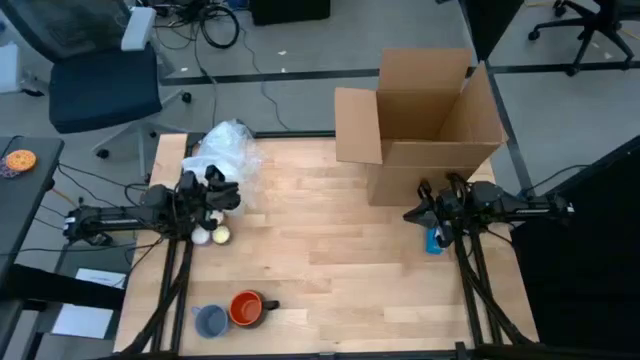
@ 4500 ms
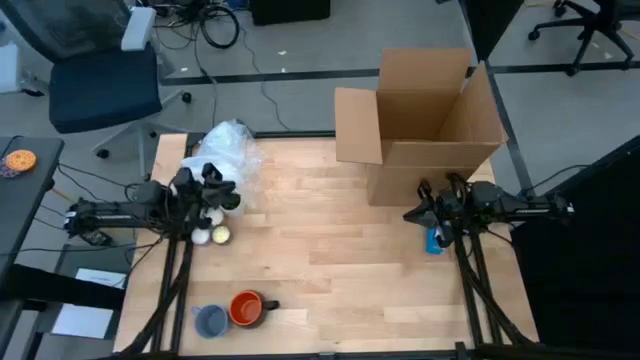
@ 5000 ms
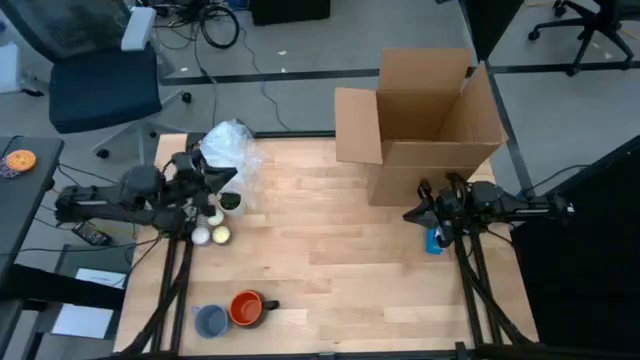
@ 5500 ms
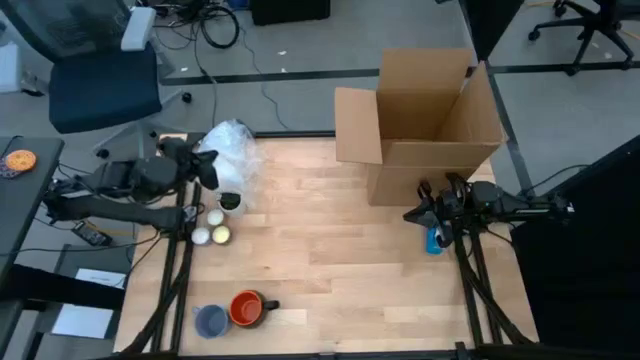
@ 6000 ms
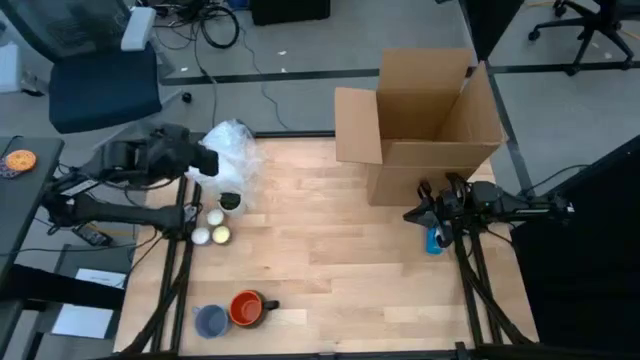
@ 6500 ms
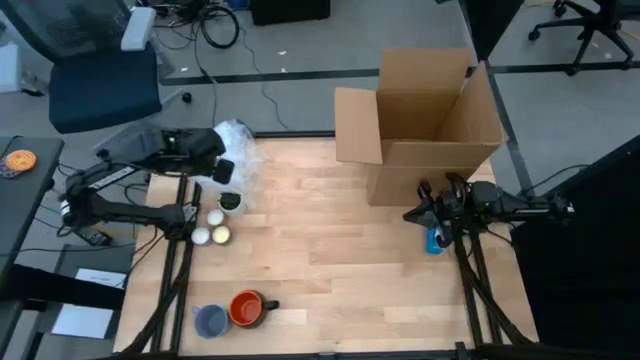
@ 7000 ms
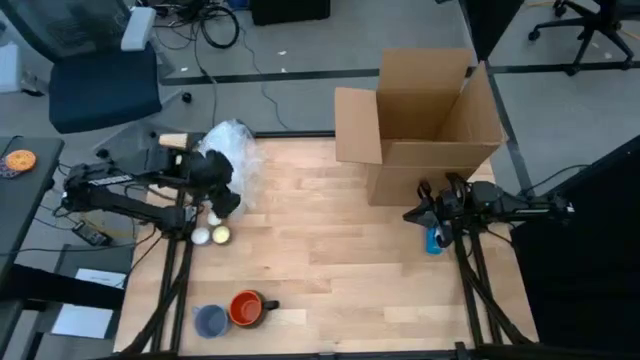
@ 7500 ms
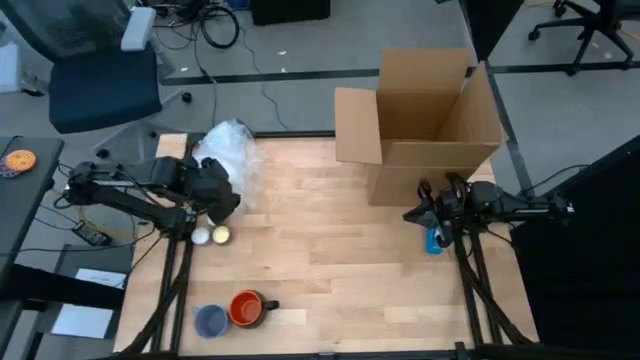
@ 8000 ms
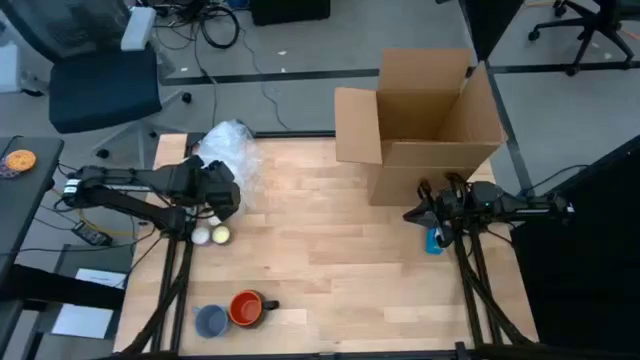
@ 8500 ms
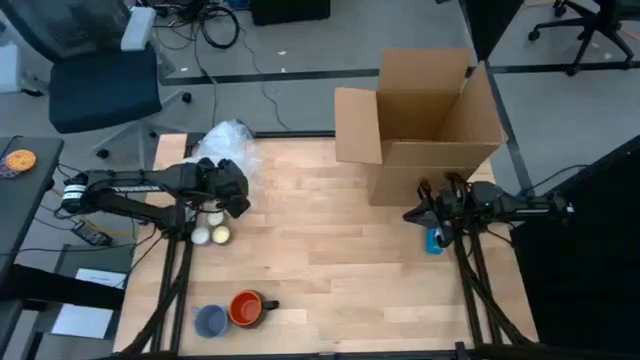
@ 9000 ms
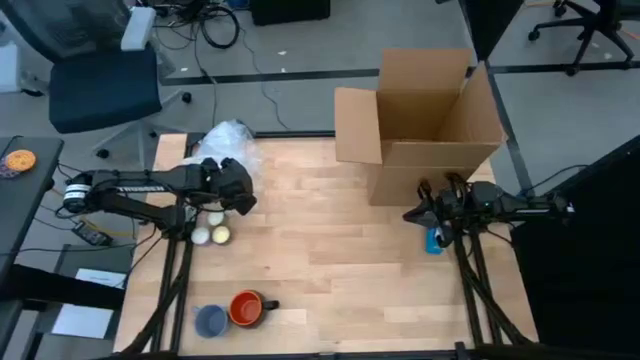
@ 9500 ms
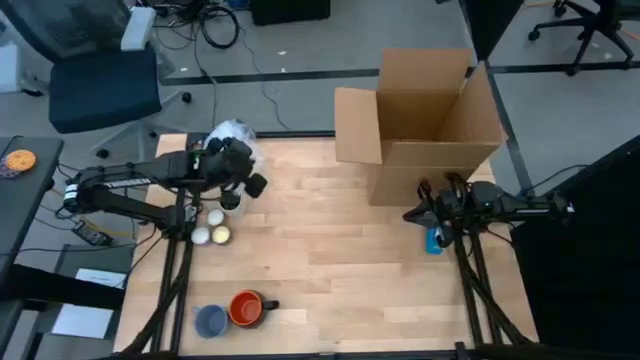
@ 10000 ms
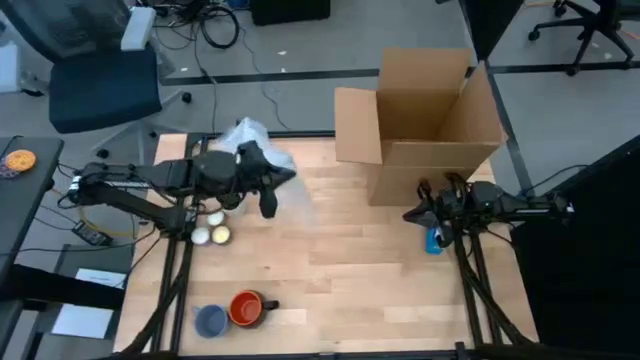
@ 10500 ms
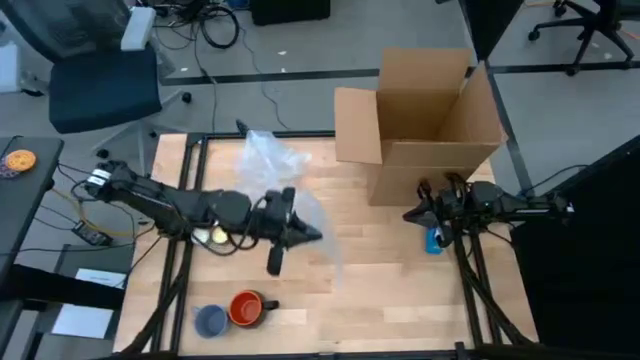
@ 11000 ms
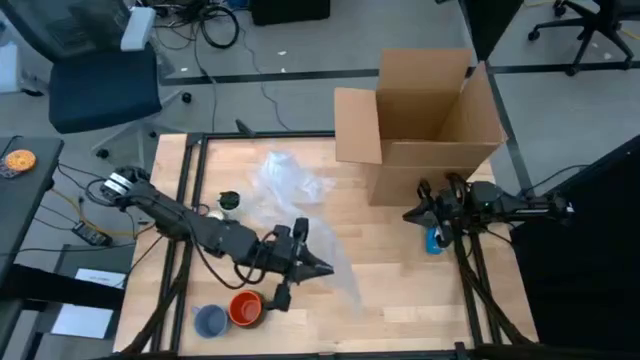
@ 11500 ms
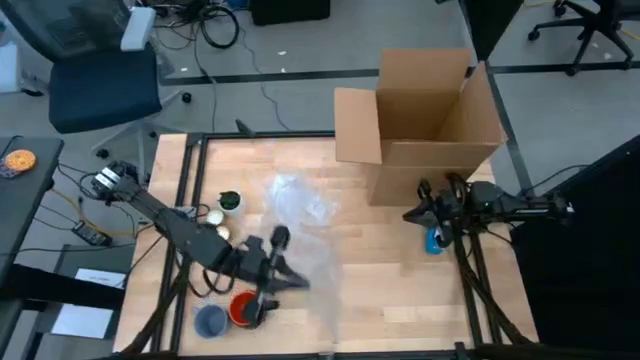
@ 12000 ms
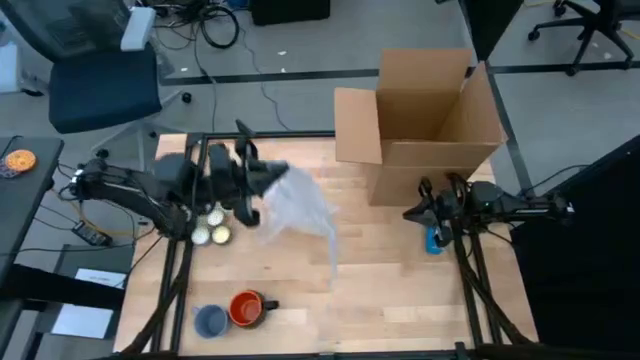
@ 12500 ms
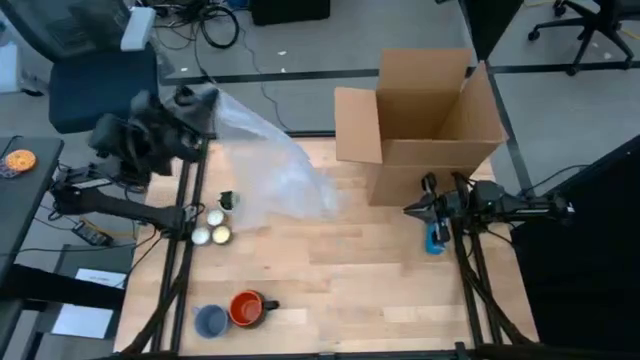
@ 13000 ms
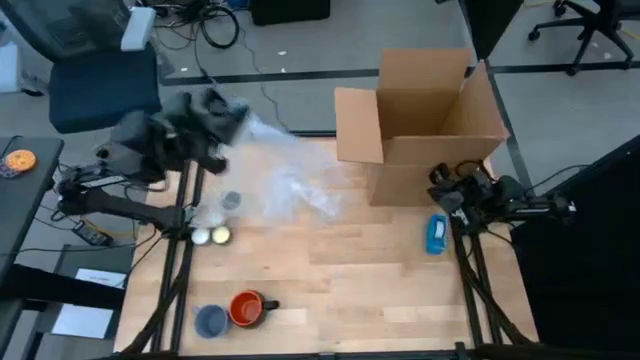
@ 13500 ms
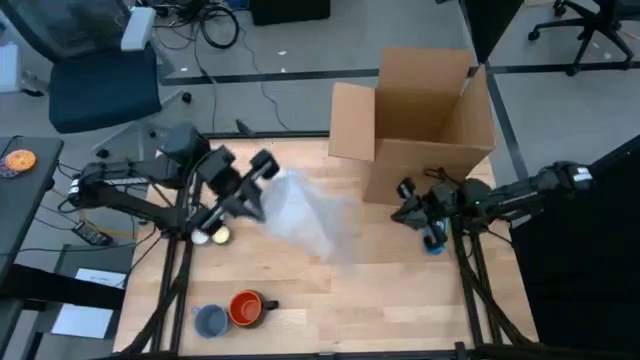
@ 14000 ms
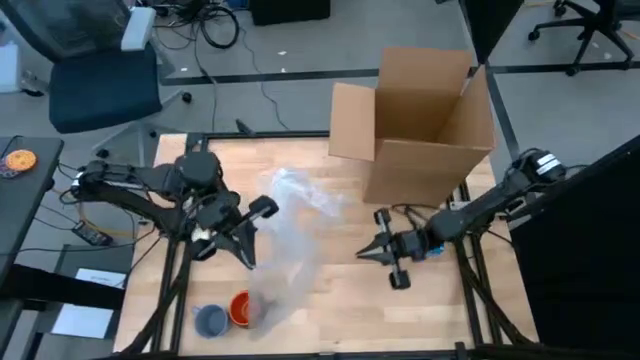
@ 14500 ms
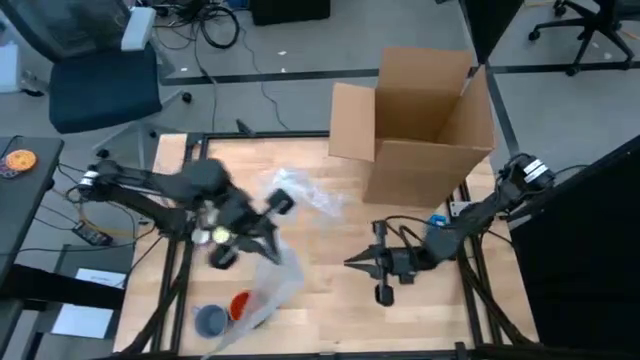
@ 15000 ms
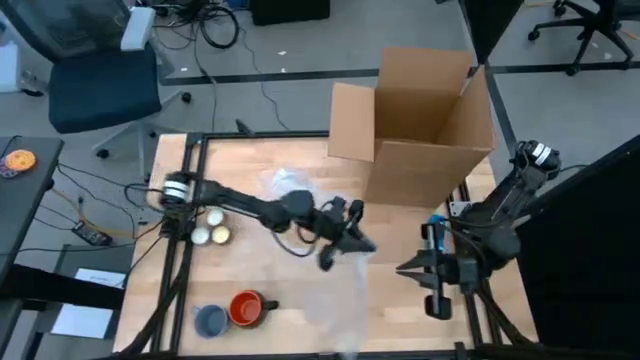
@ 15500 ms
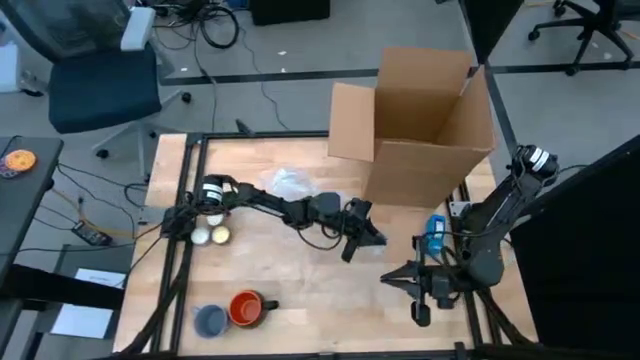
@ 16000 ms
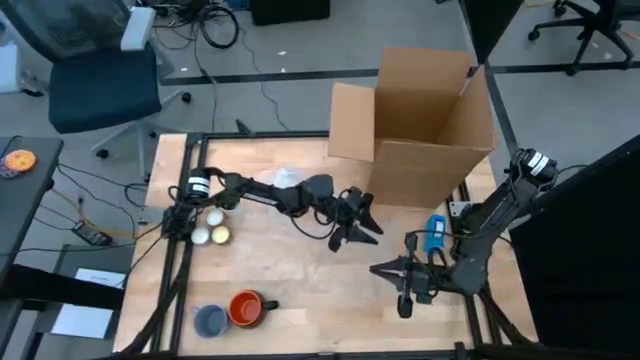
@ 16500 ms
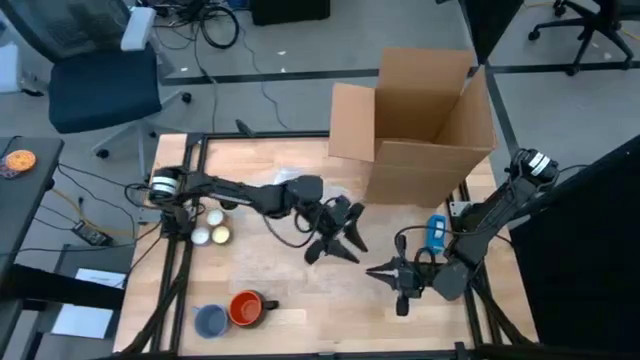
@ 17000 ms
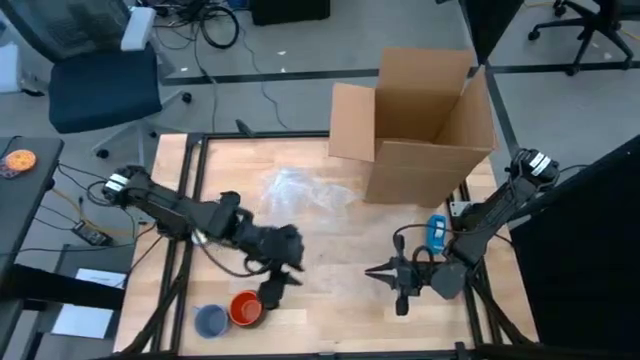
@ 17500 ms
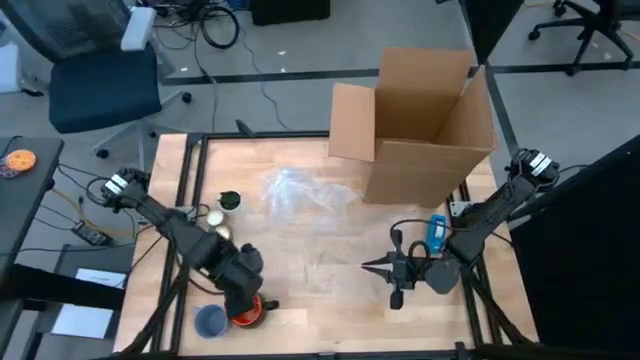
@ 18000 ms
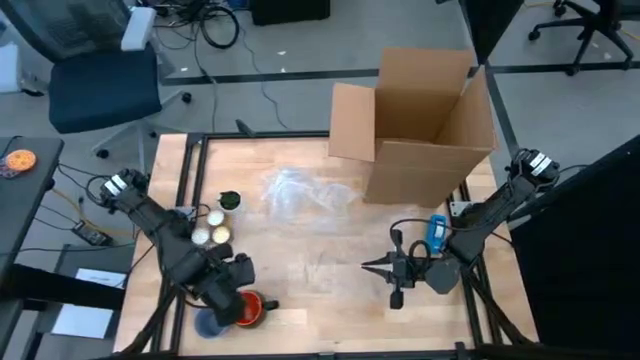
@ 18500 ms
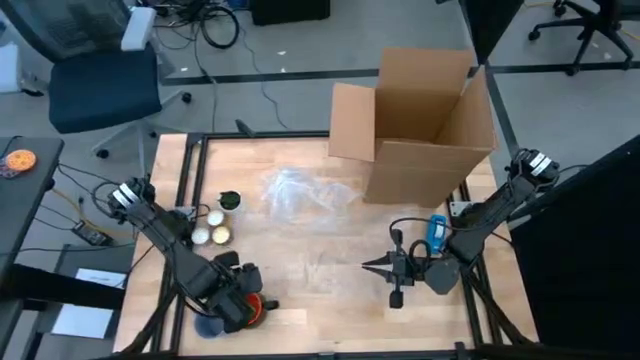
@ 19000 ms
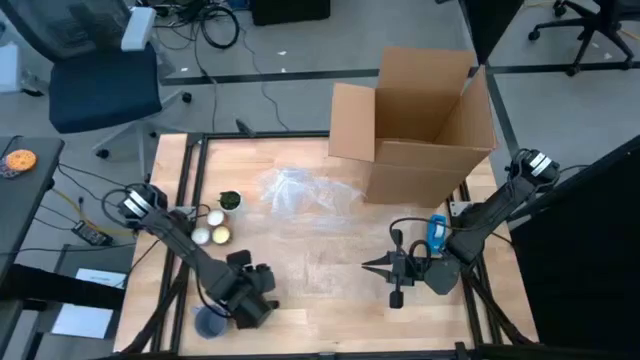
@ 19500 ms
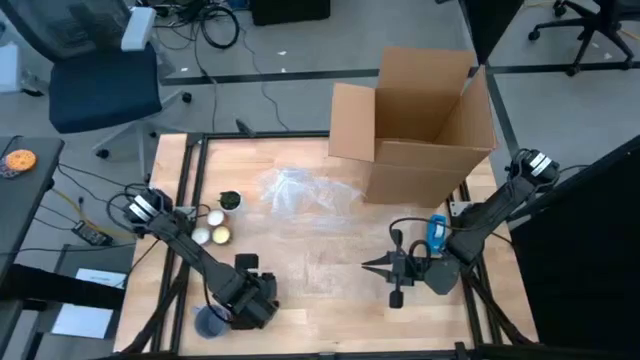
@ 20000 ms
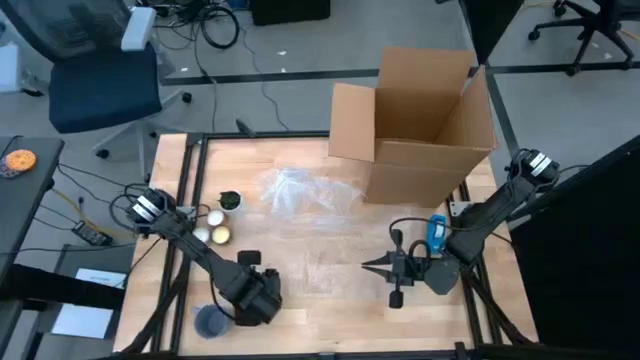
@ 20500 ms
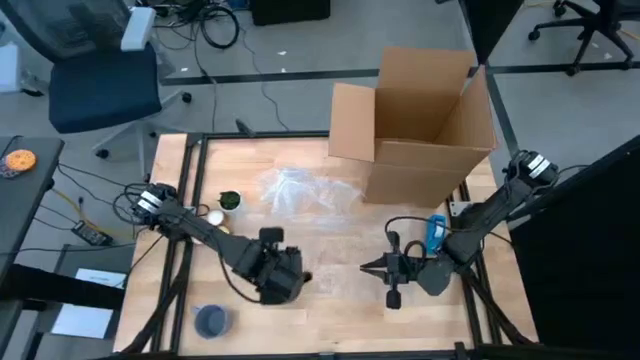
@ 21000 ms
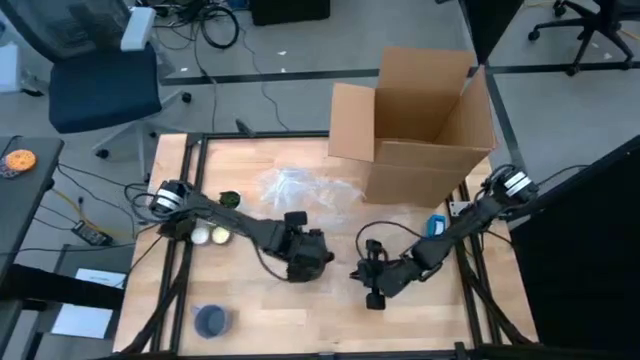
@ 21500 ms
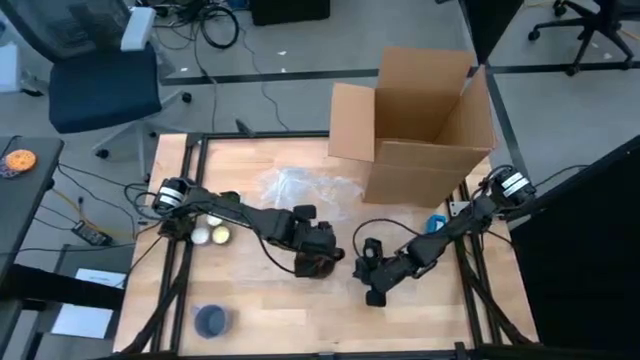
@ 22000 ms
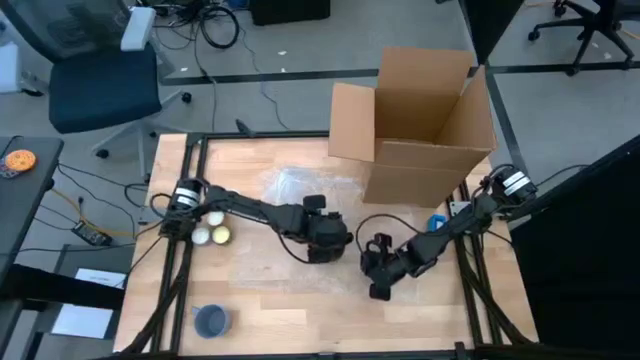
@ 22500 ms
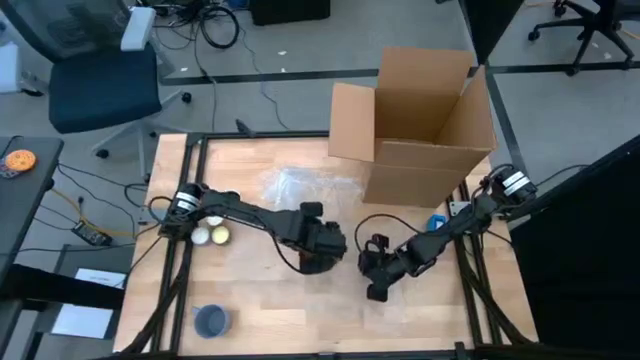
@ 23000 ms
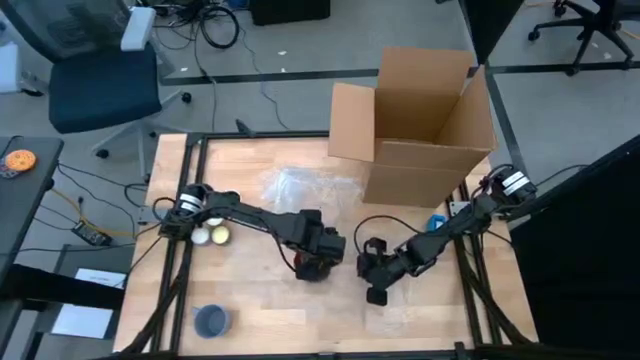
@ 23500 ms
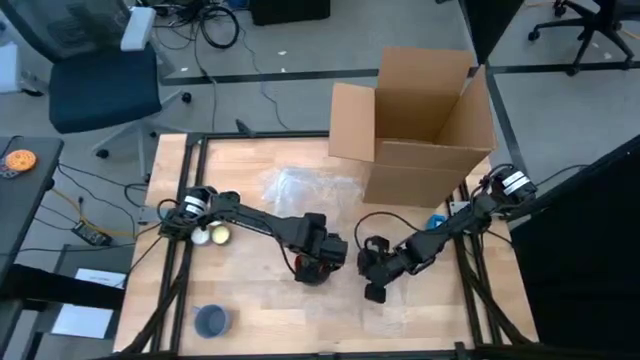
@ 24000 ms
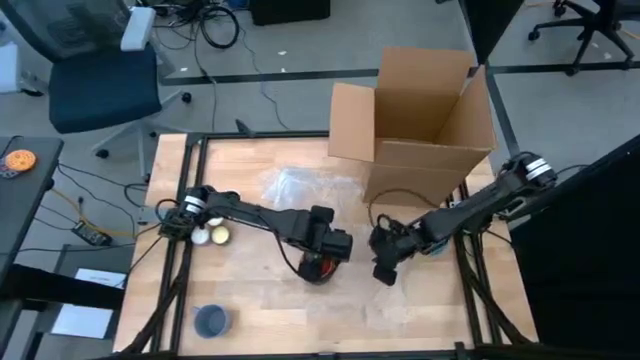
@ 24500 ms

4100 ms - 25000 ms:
Task: wrap mug
Wrap the black mug with bubble wrap
